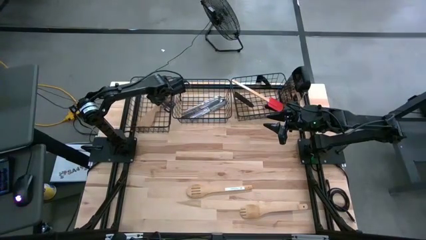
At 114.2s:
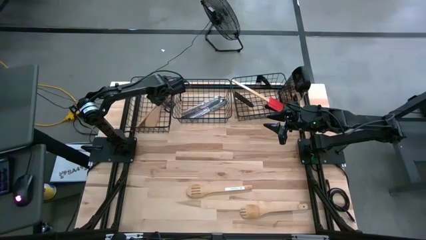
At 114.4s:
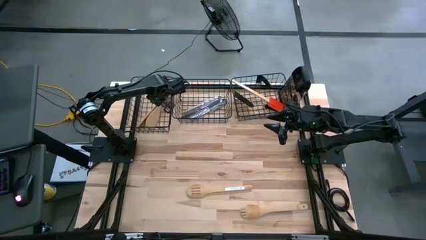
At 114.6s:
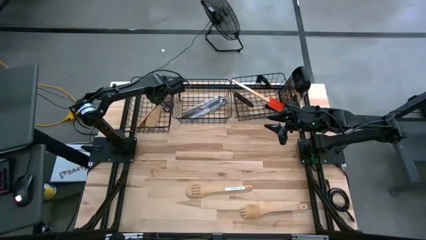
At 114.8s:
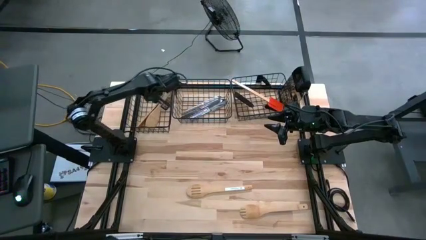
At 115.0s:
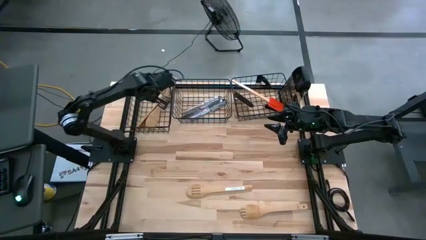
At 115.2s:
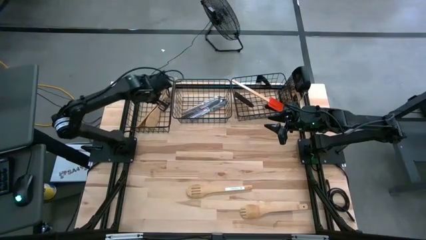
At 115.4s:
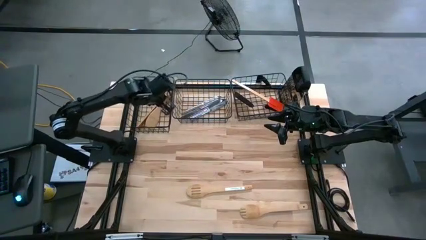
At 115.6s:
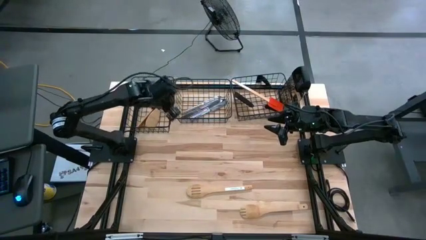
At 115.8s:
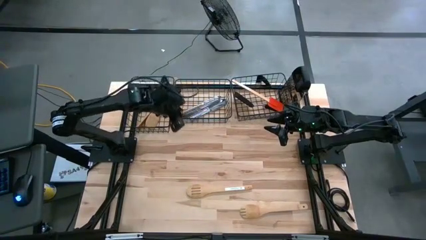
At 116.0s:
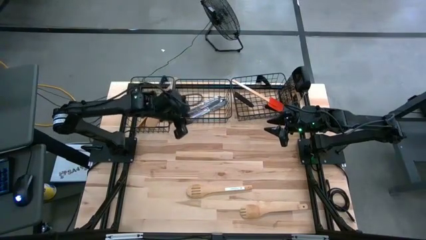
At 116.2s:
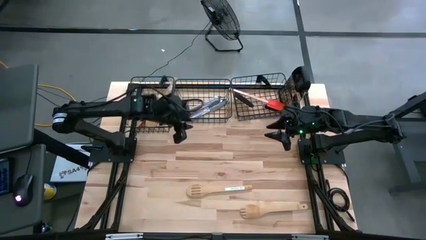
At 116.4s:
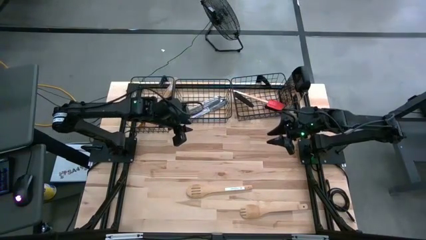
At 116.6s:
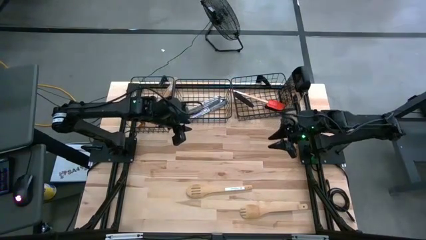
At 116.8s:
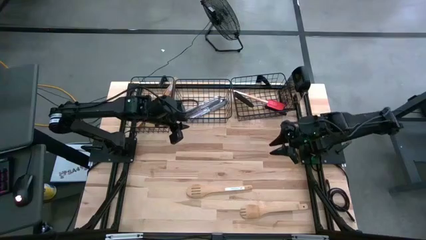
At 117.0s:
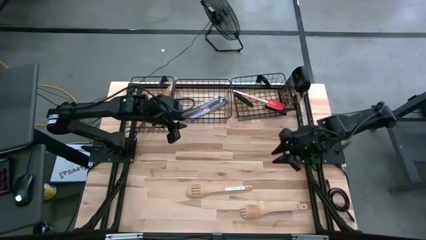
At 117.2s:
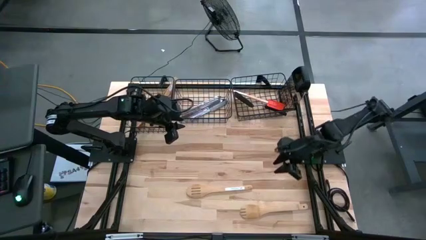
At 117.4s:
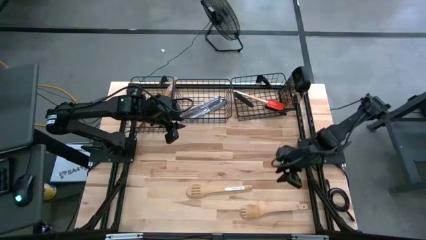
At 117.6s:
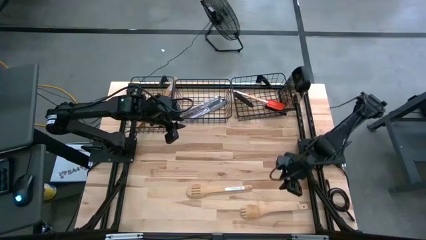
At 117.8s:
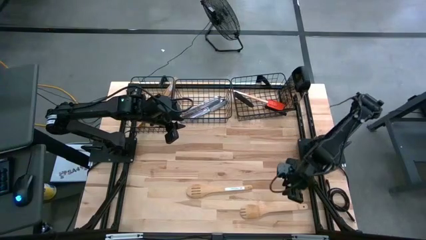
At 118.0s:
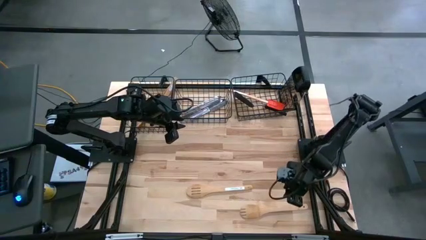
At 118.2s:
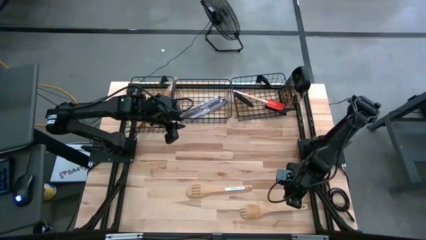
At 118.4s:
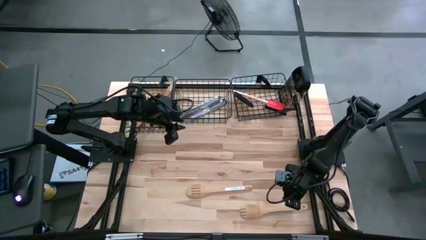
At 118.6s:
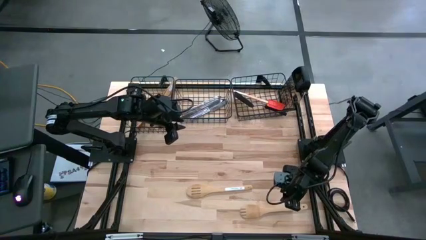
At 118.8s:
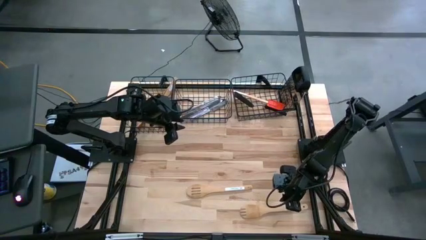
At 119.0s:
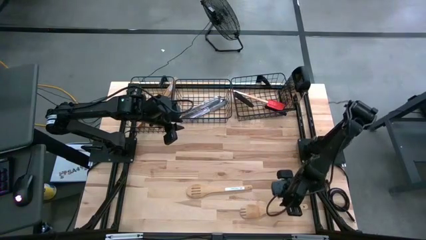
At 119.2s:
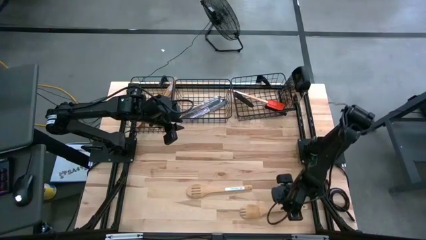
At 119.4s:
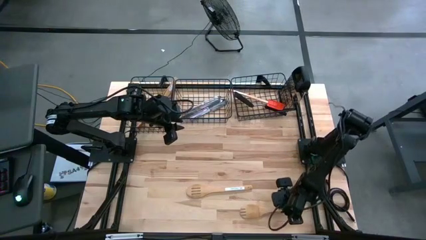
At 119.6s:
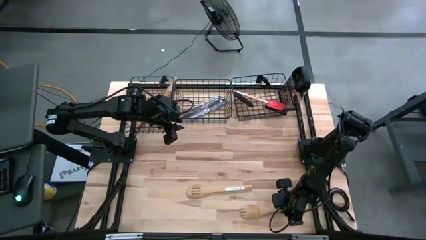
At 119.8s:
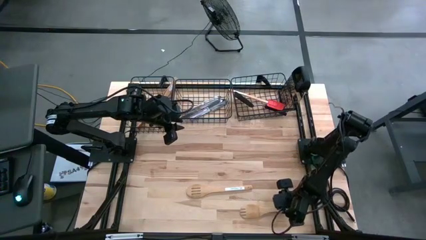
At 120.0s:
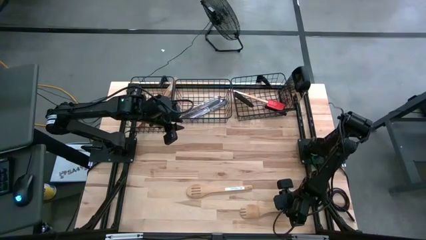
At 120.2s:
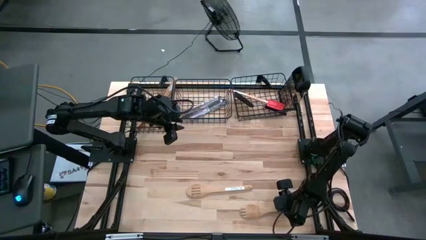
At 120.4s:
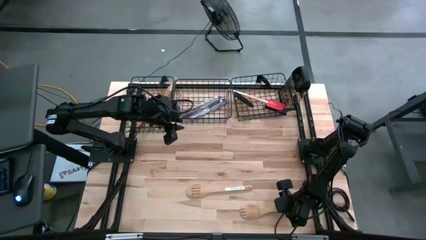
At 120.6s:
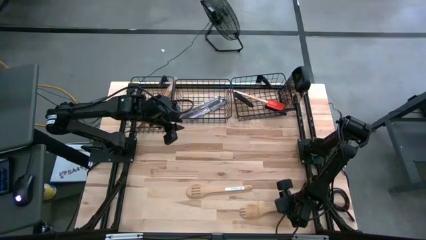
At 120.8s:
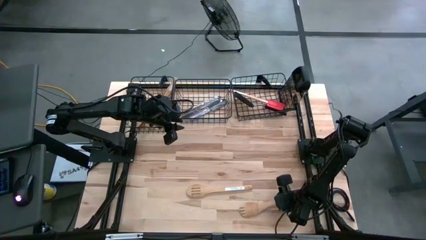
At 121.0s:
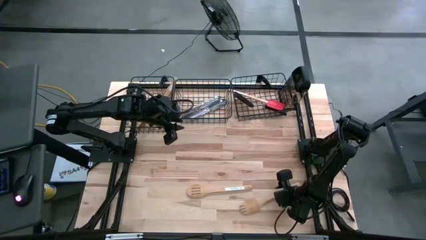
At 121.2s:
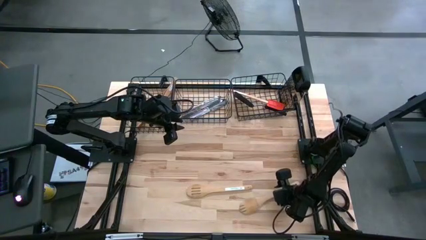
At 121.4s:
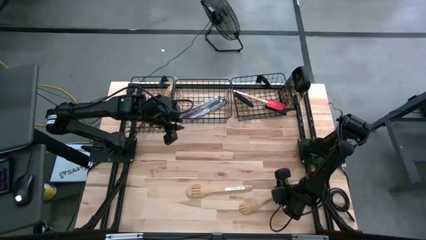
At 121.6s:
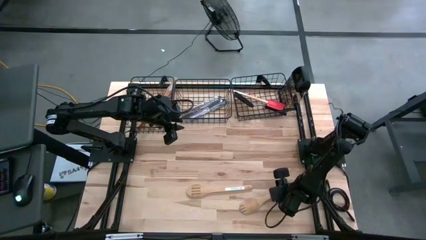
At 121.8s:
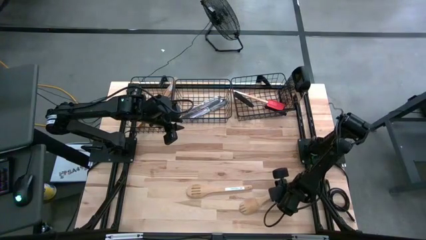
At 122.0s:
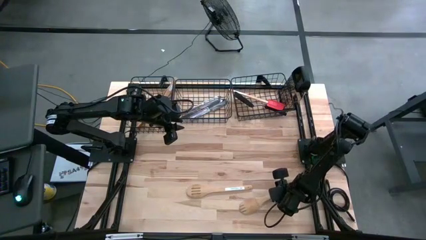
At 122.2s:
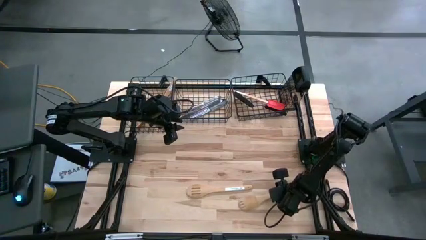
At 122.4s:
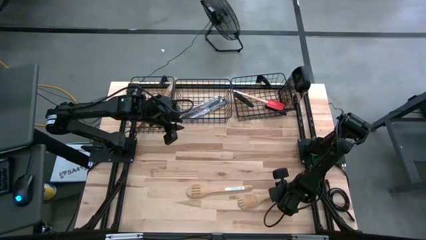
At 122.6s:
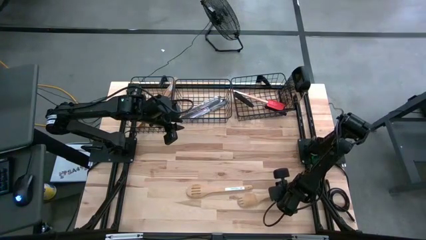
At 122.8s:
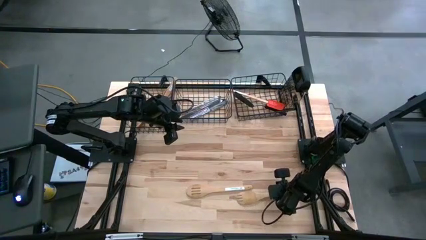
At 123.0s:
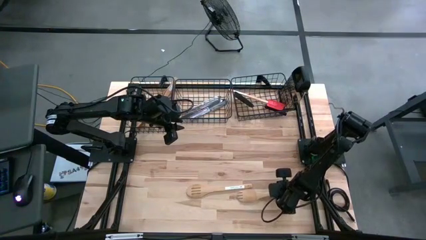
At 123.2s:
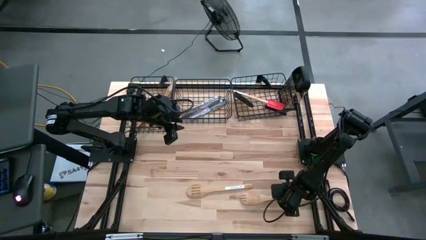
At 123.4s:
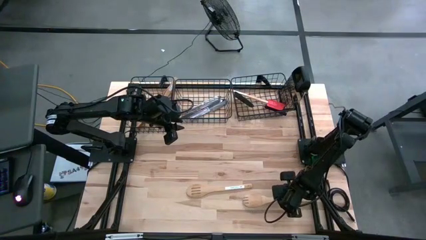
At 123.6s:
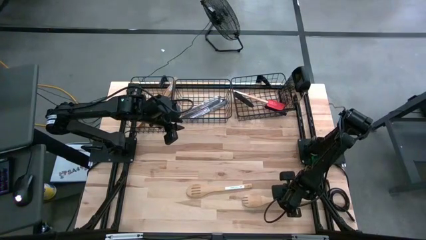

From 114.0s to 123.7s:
Task: Pick & Place Kitchen Items
Put the wooden serving fork into the left wire basket

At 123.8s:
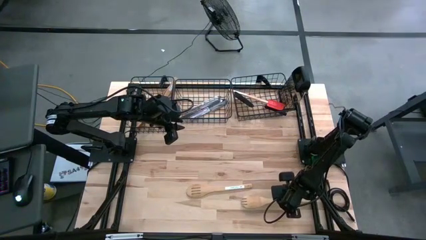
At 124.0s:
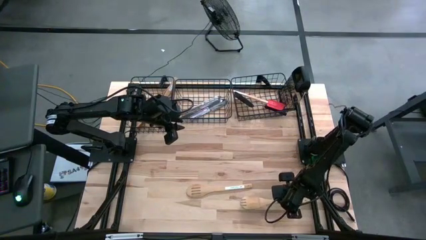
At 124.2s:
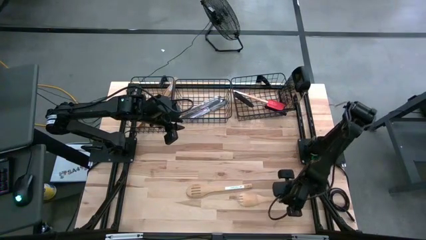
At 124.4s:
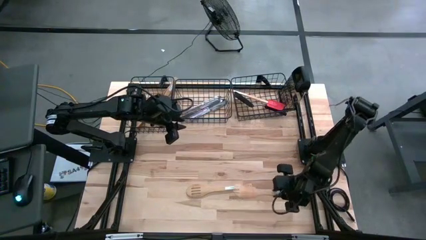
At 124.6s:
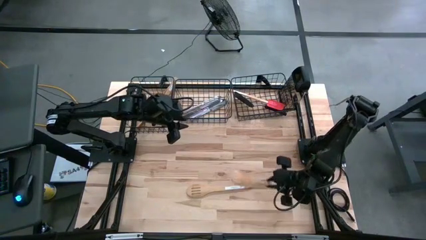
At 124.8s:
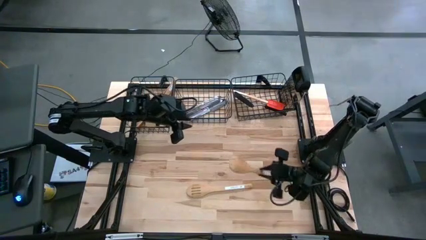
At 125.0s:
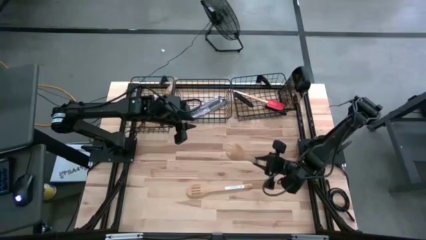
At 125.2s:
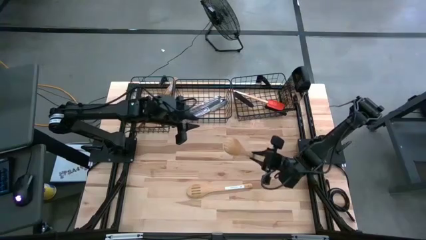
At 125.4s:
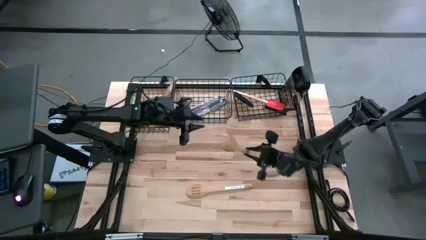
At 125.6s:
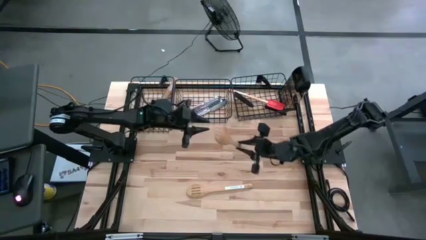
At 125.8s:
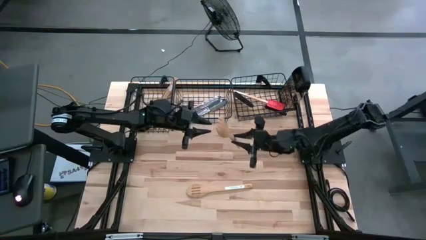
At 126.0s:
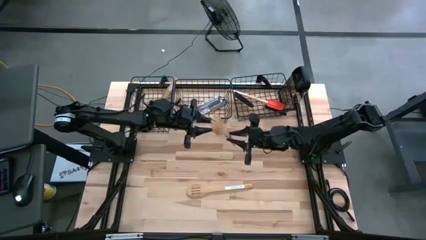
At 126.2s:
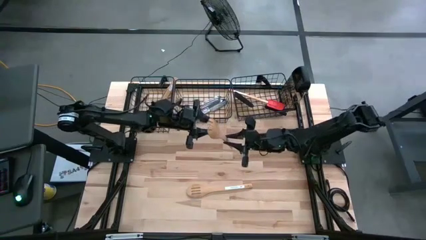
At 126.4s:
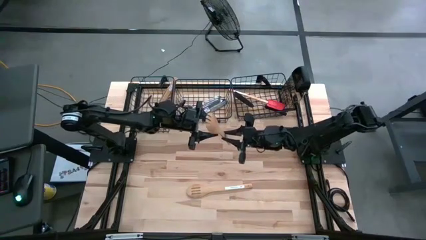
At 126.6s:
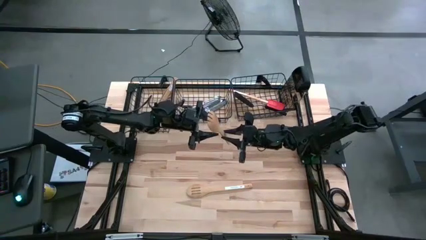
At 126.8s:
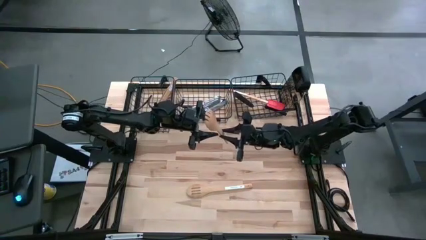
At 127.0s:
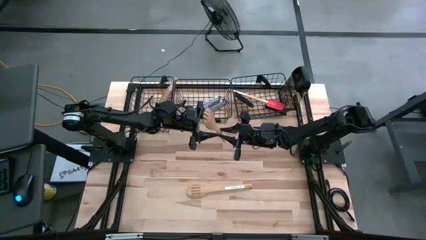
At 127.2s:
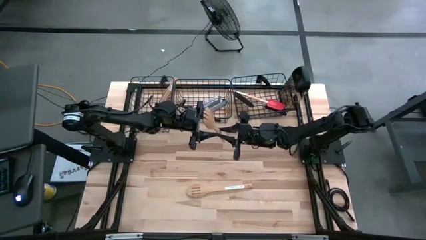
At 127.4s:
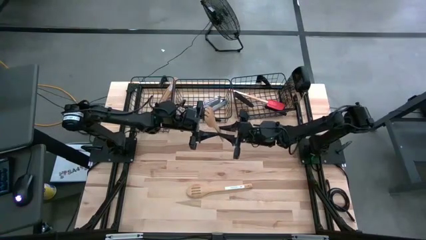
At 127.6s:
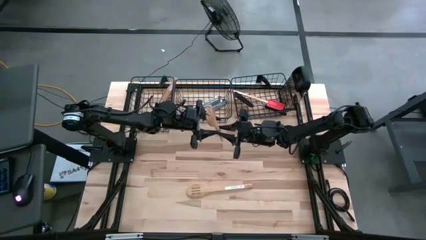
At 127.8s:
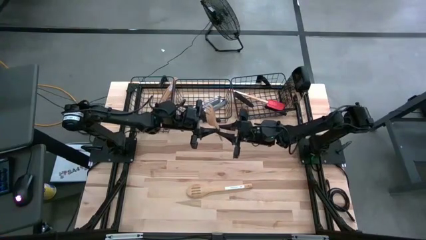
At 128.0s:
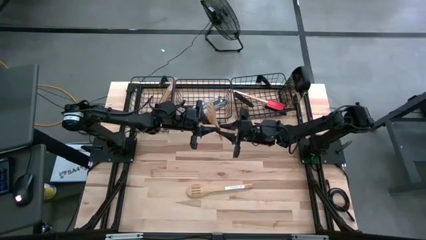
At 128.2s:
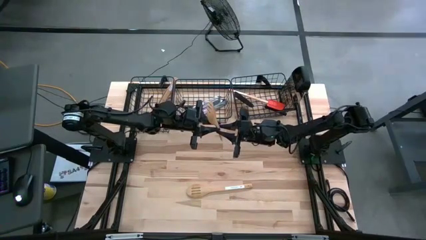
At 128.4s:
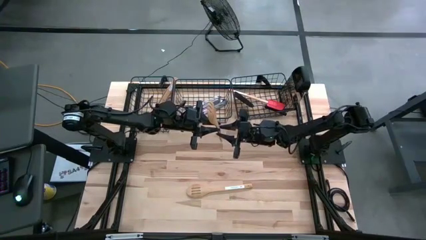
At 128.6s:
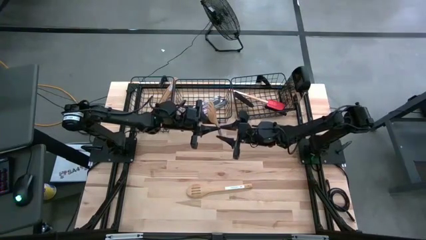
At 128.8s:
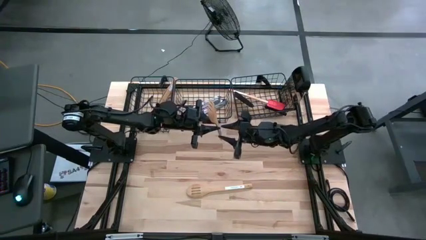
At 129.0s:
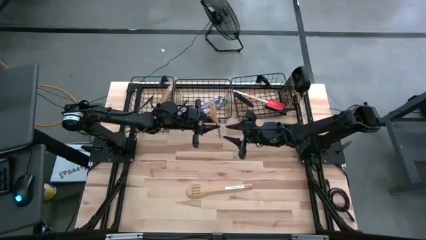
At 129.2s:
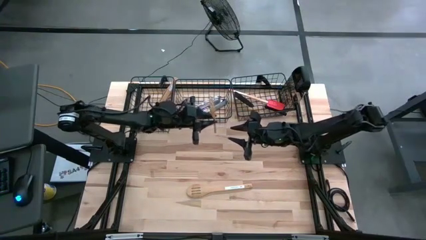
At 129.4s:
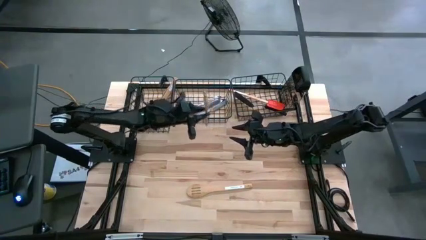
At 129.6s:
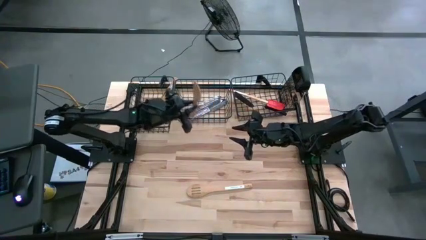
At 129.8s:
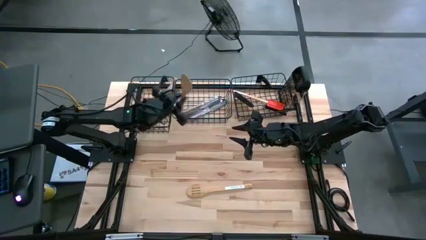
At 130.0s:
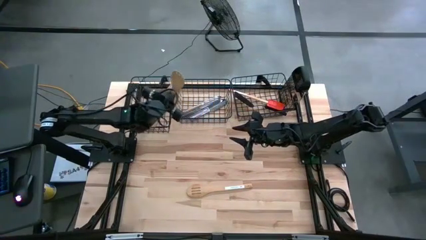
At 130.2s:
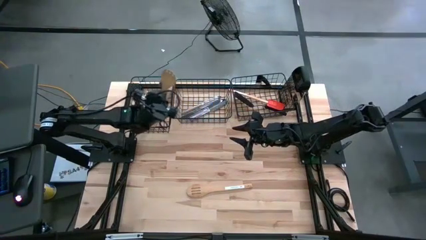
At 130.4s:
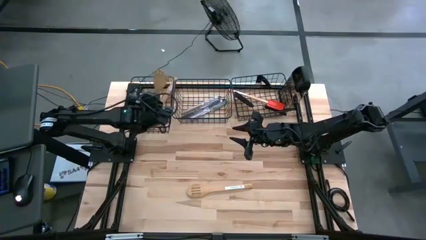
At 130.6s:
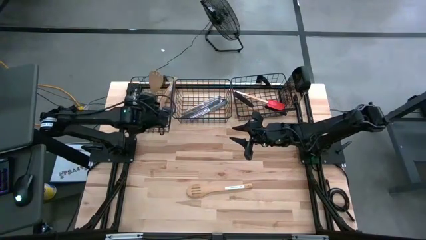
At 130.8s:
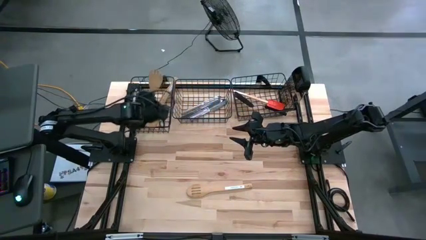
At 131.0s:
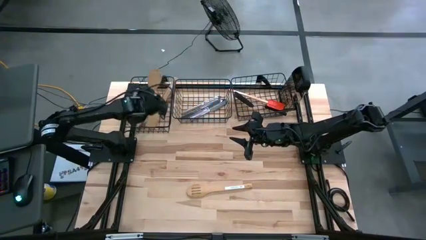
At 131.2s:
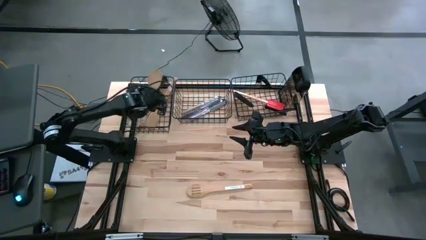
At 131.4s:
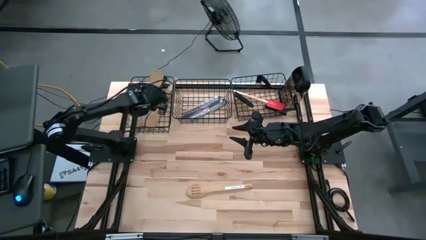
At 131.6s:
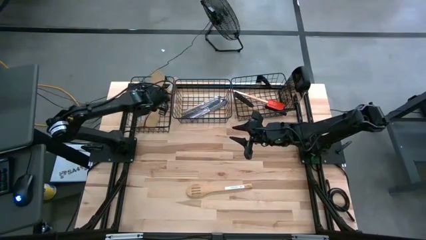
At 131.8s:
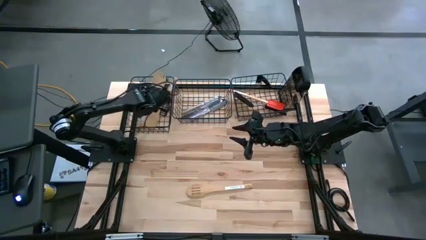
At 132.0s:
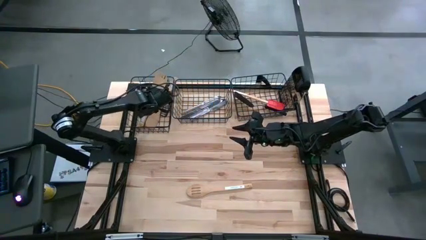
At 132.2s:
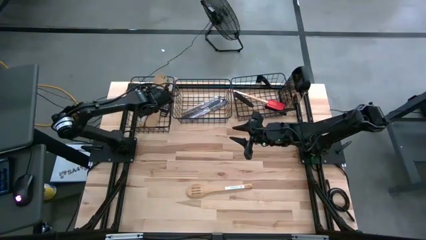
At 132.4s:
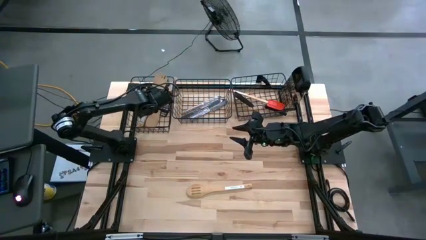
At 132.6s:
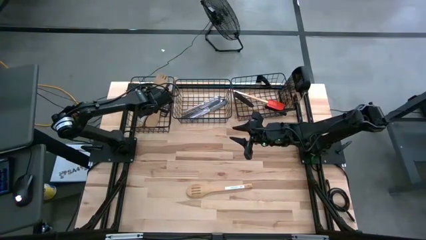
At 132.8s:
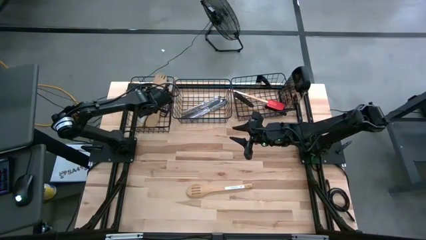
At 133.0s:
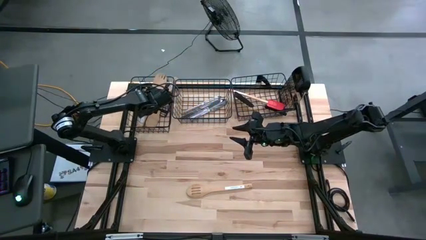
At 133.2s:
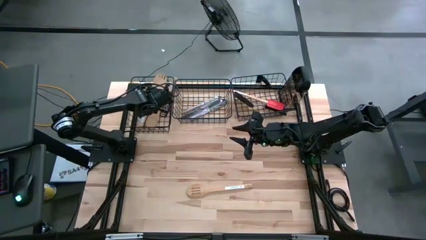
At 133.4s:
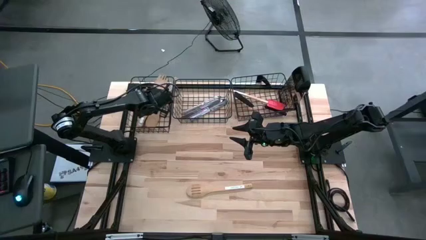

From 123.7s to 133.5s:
Put the wooden serving fork into the left wire basket
